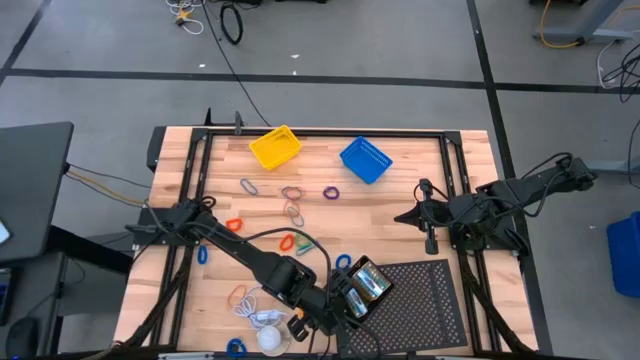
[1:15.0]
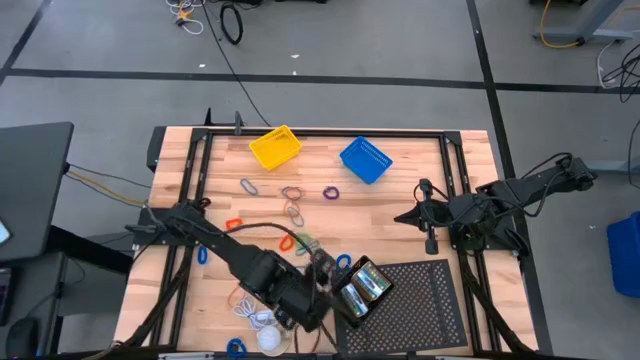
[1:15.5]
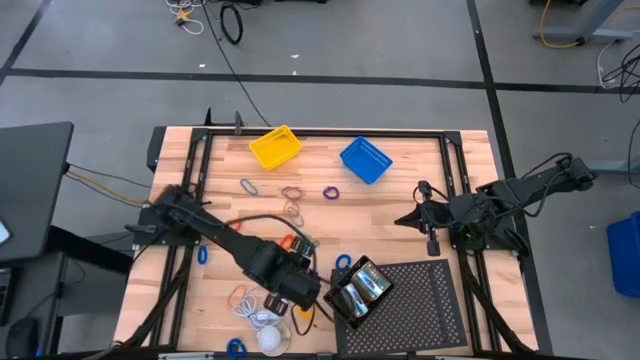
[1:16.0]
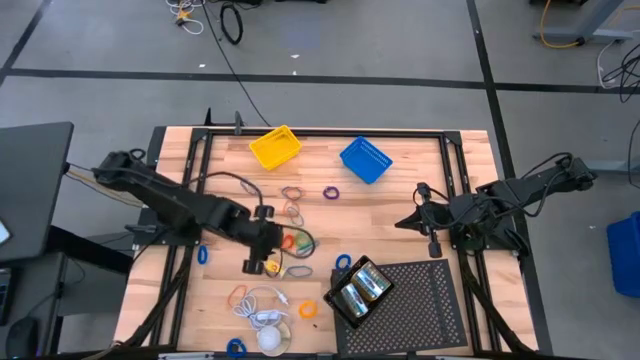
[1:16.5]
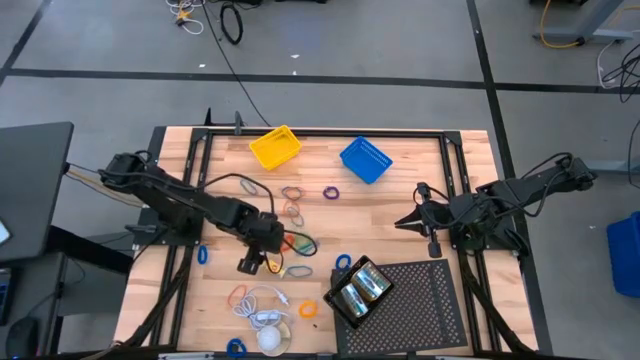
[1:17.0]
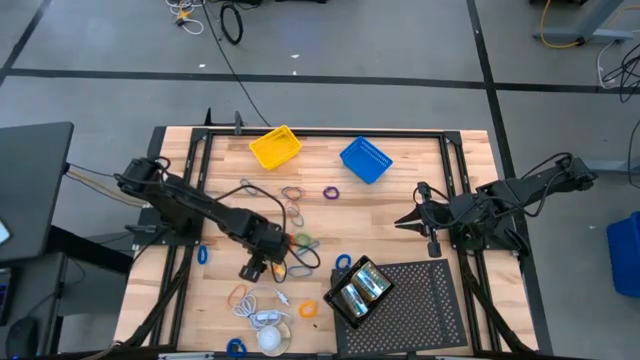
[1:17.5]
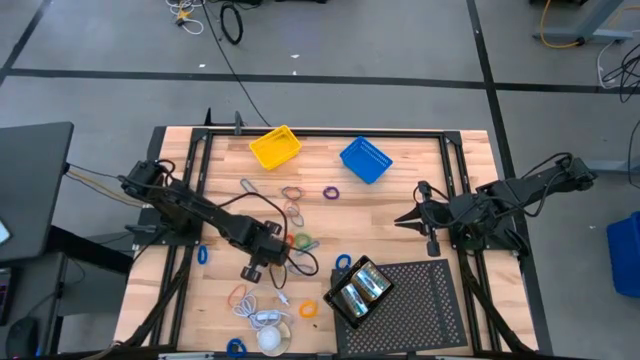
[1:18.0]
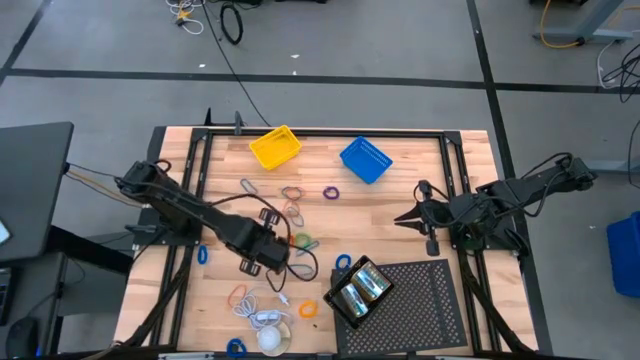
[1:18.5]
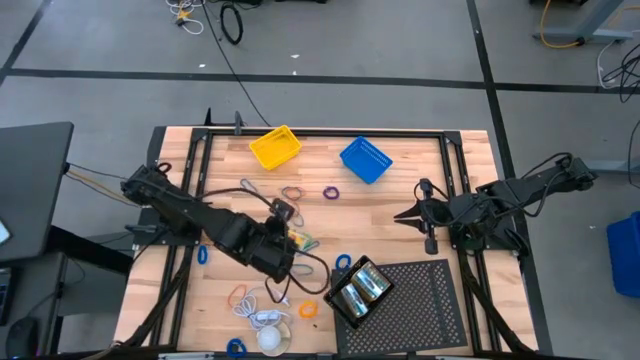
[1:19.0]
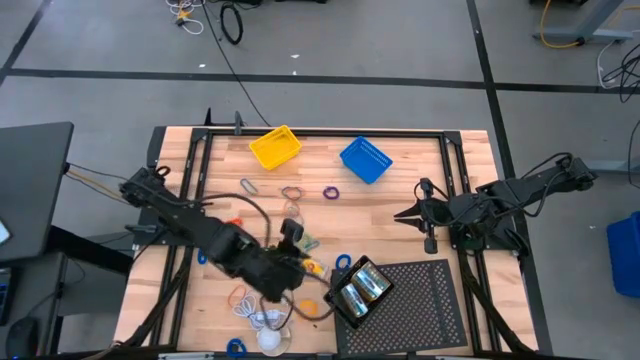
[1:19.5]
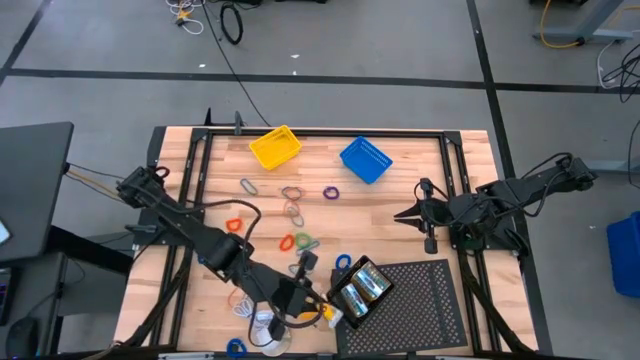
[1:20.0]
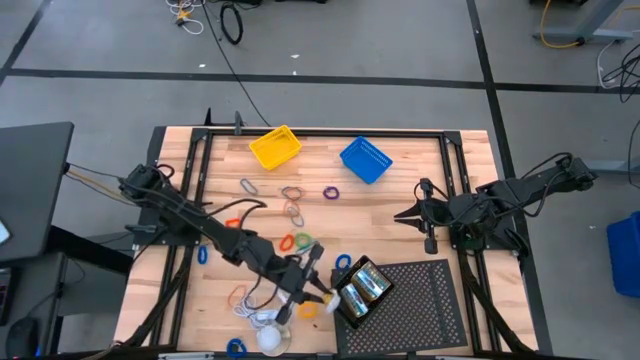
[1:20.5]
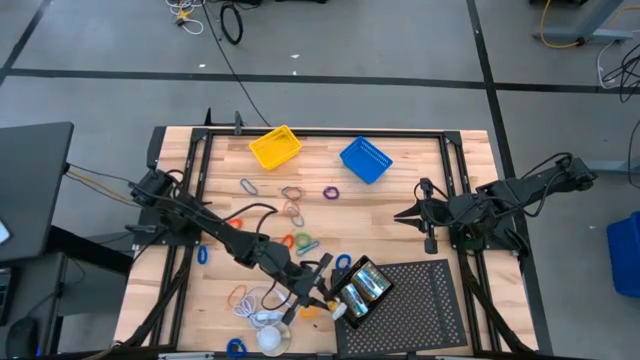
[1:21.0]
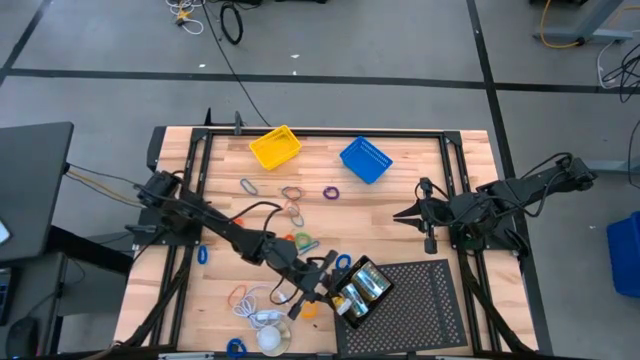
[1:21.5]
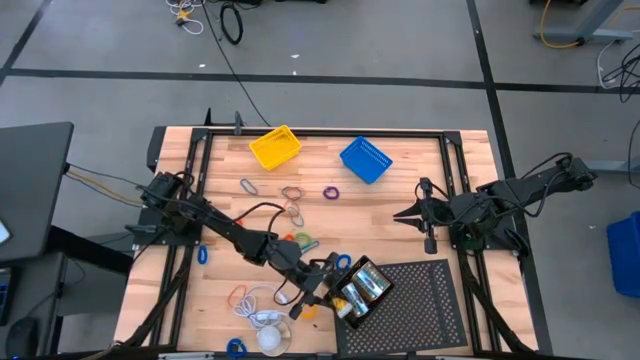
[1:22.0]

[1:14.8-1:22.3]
Task: Pick & Place Office Desk Supplies
Put the crayon box into the black basket

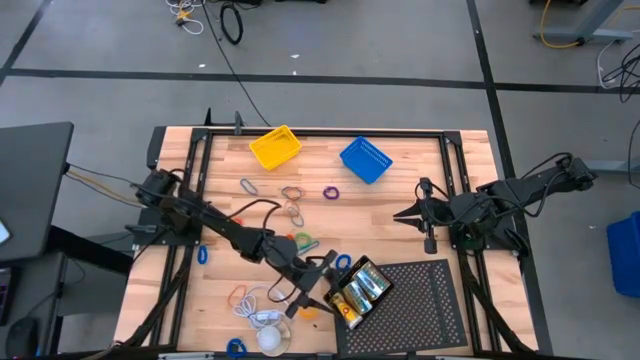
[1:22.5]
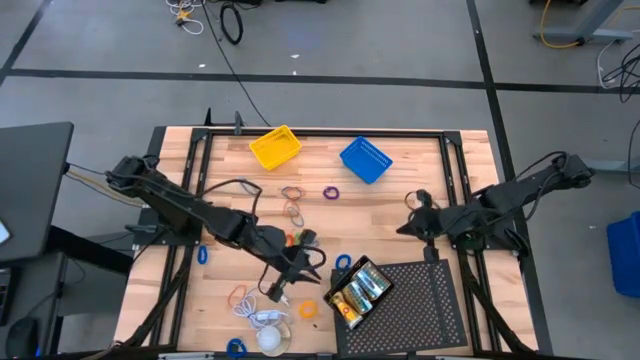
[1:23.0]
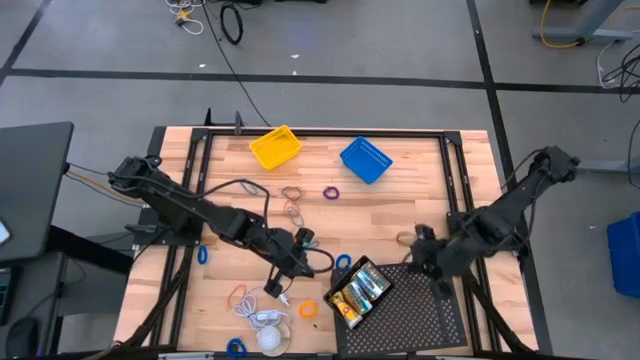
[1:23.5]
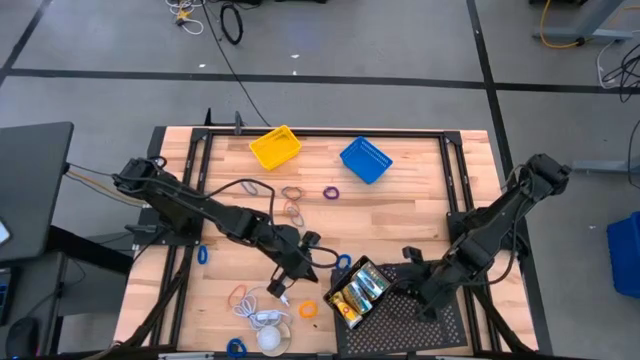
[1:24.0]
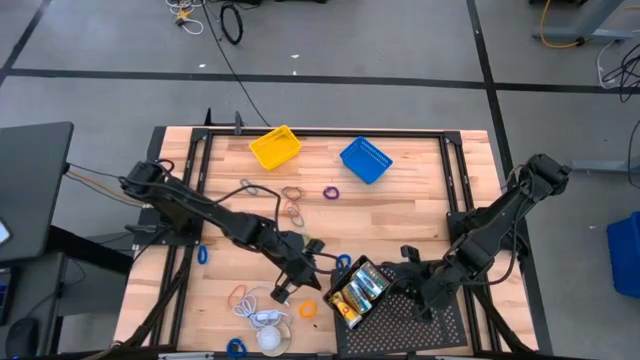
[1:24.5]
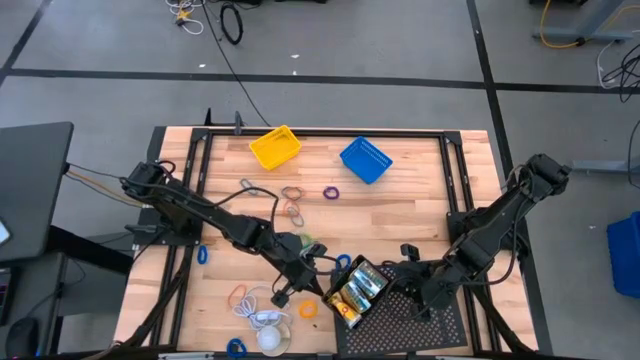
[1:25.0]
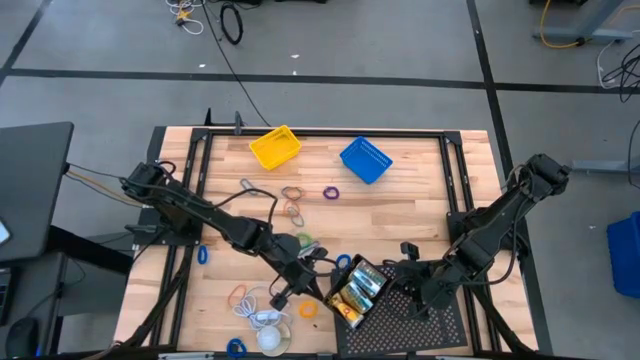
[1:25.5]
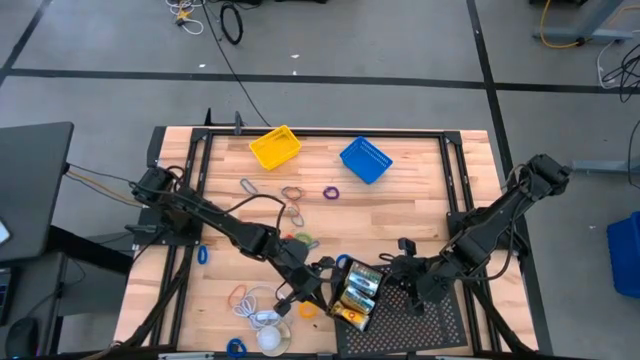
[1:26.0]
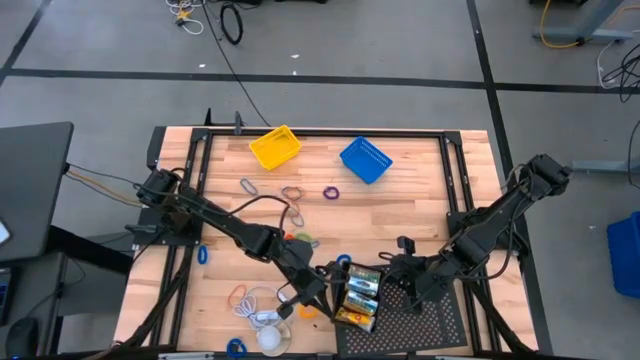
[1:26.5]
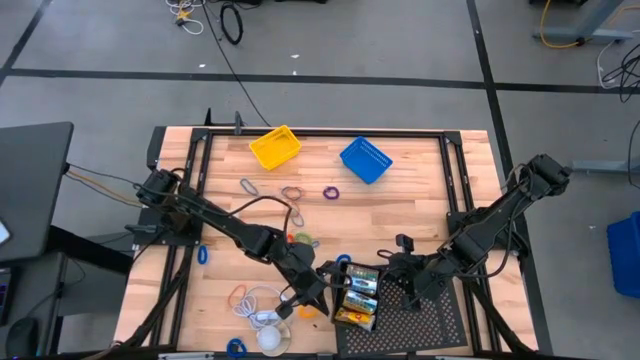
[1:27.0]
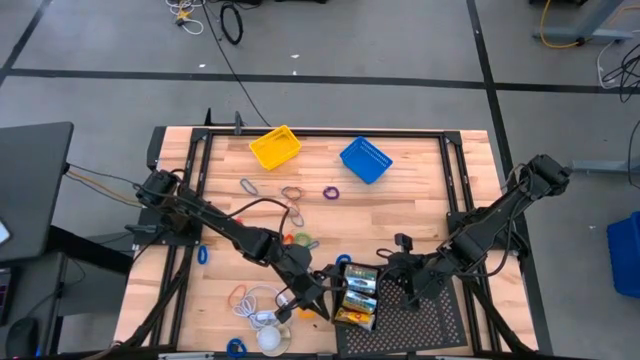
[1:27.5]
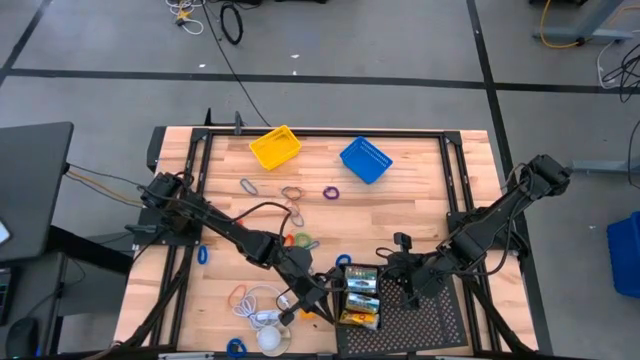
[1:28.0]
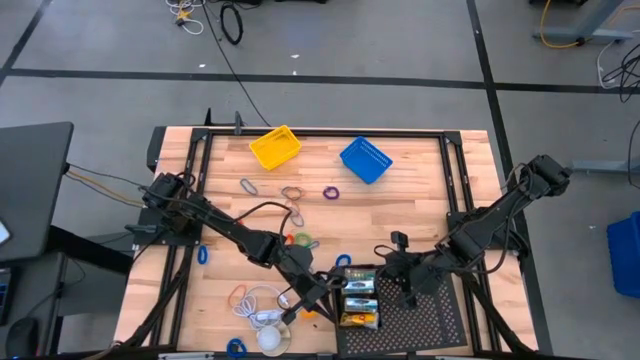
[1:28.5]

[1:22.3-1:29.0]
Adjust the black basket filled with crayon box on the shelf

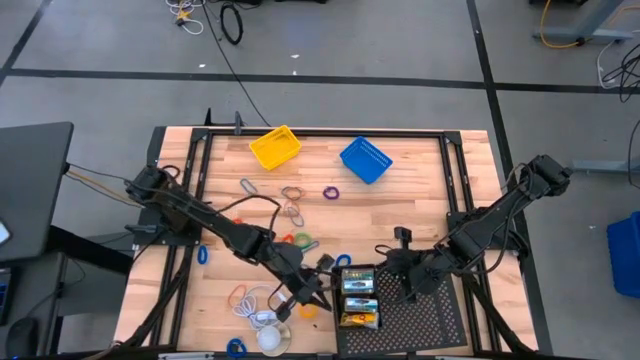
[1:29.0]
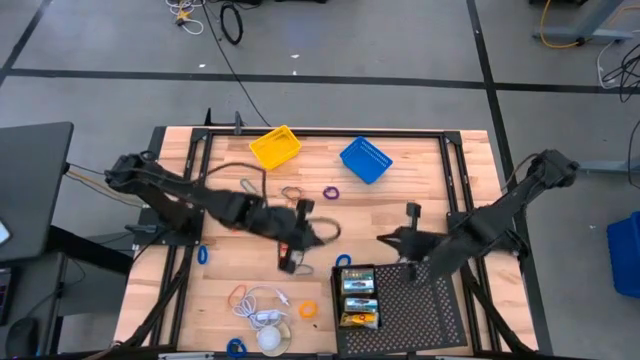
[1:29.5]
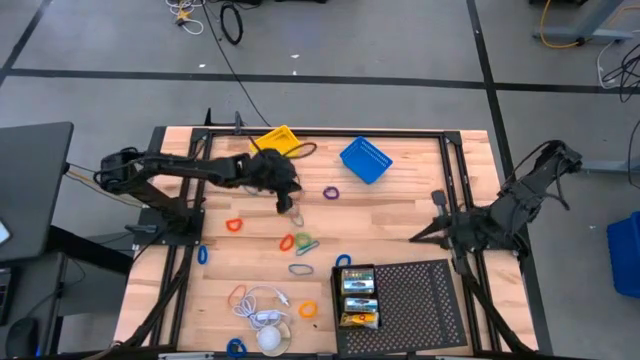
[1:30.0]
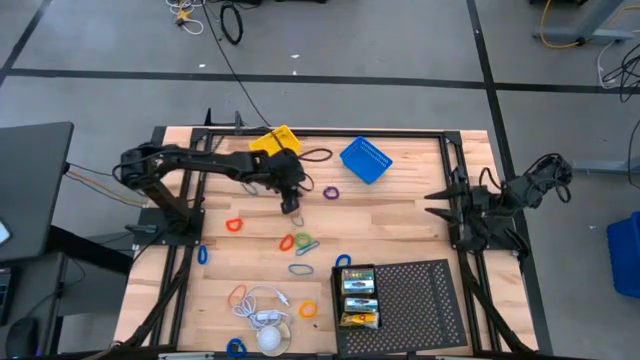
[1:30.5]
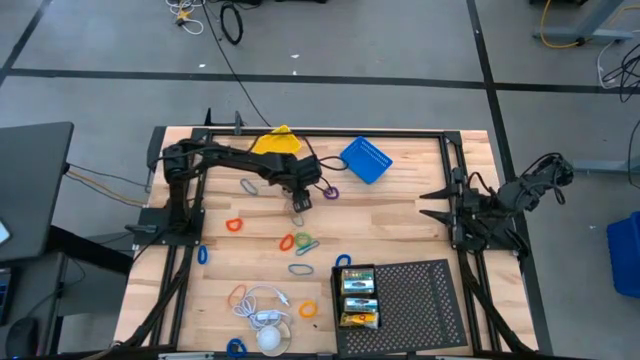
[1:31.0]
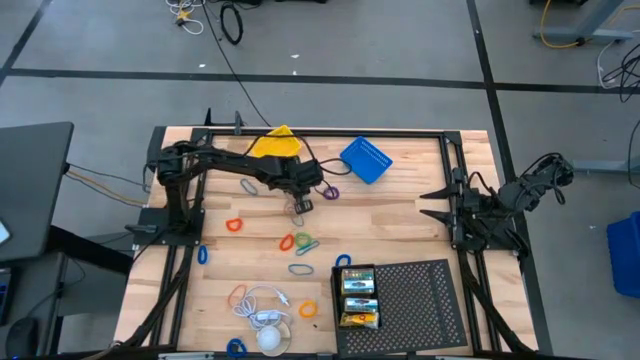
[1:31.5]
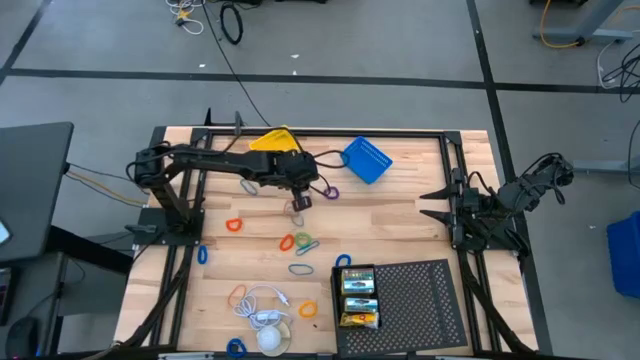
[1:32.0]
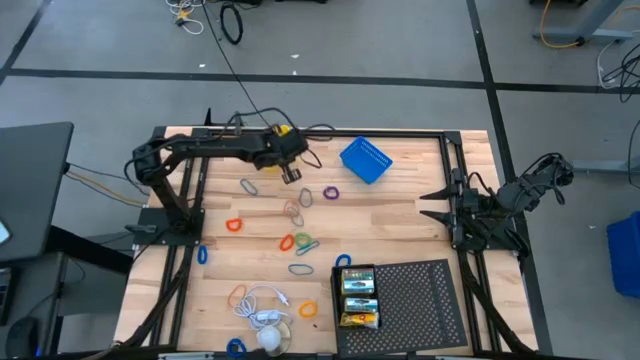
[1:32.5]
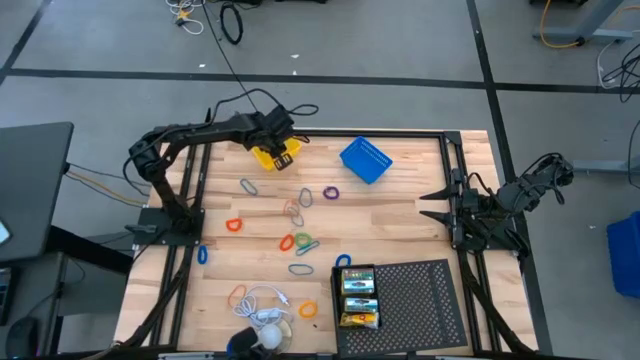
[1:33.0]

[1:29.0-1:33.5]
Put the orange rubber band into the yellow basket

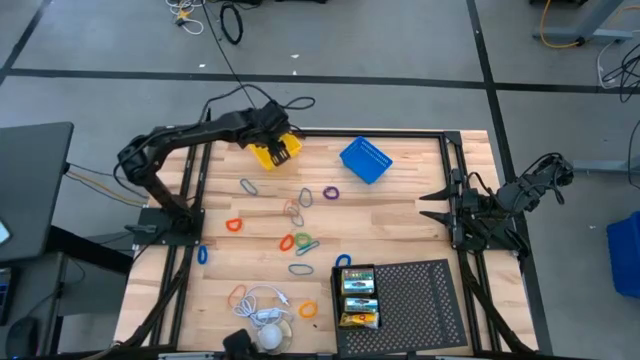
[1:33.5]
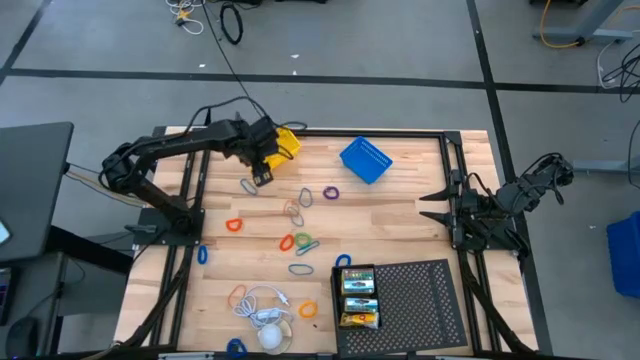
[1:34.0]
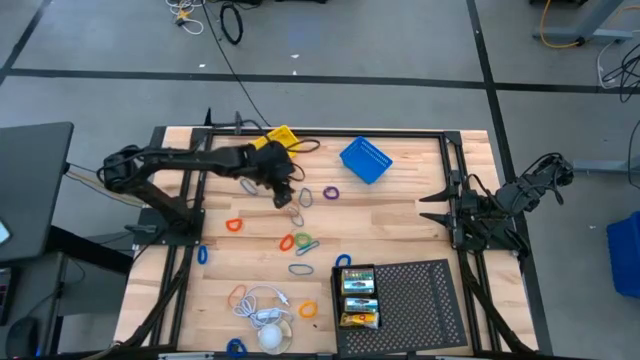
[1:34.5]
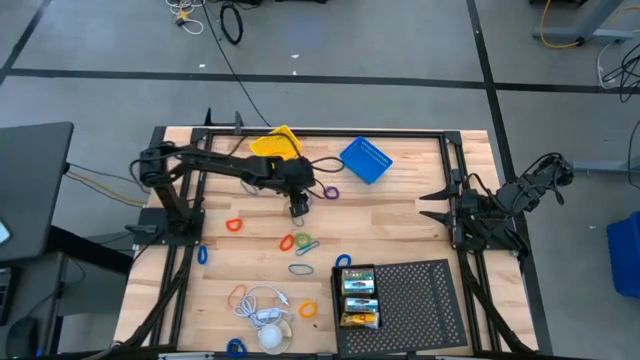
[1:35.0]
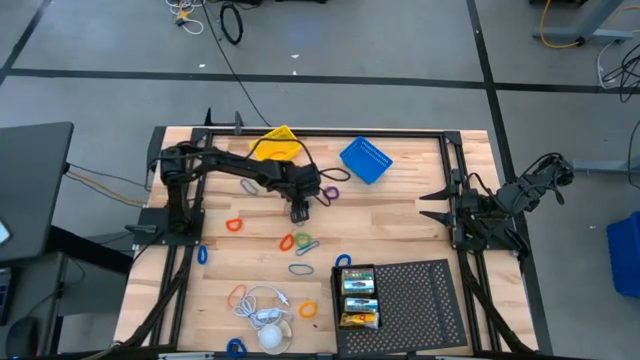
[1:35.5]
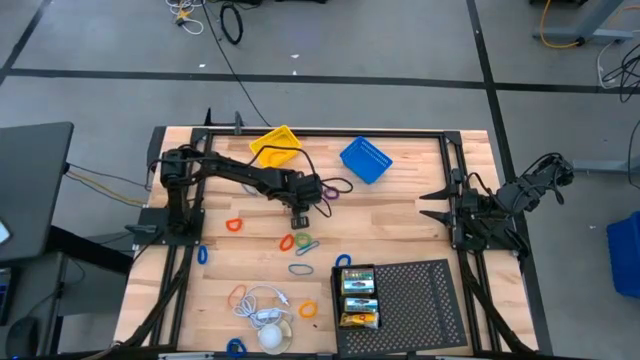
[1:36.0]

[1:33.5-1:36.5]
Put the blue rubber band into the yellow basket
